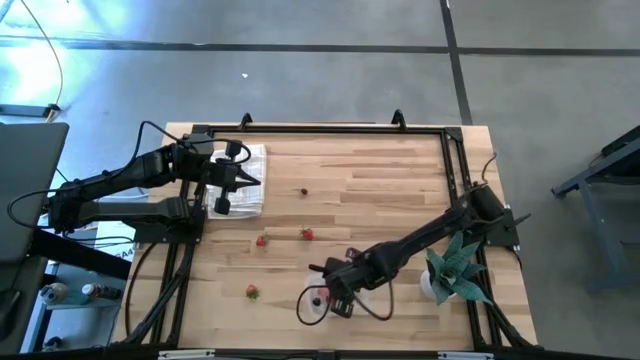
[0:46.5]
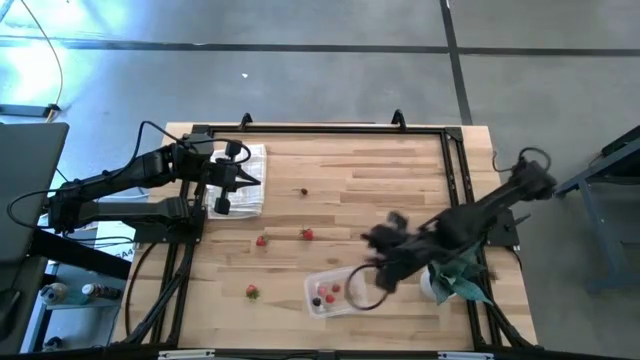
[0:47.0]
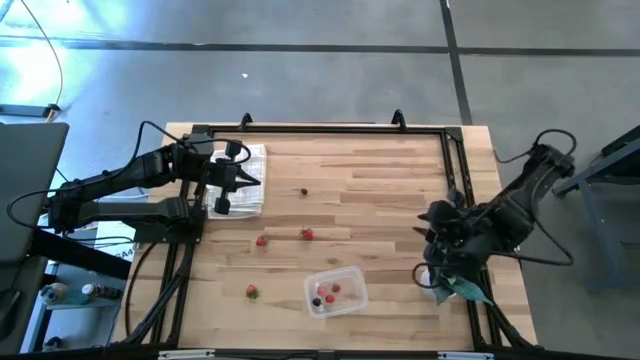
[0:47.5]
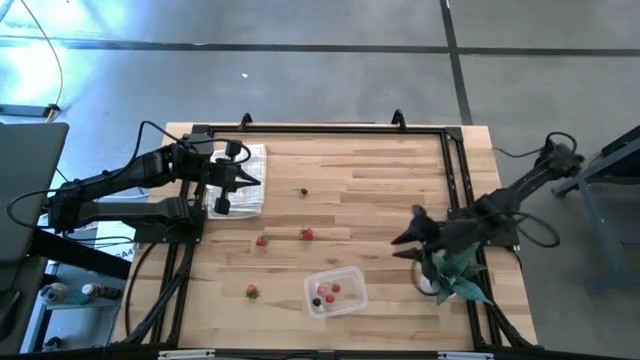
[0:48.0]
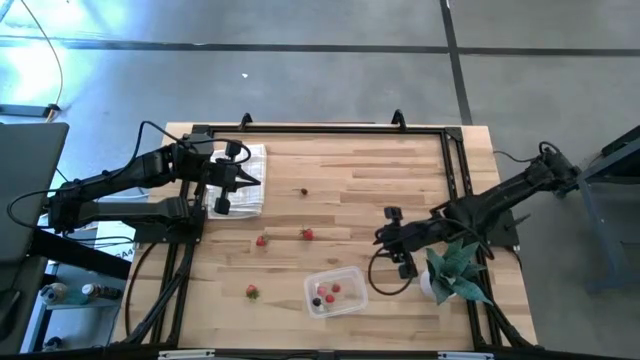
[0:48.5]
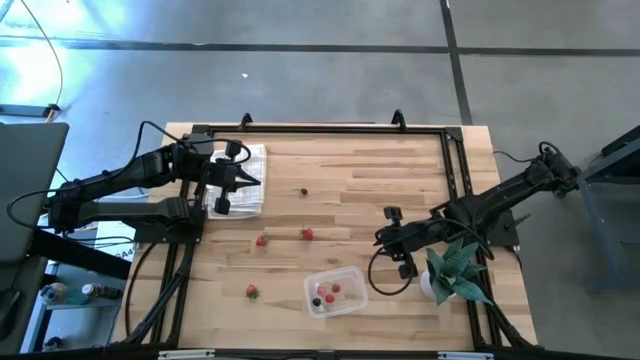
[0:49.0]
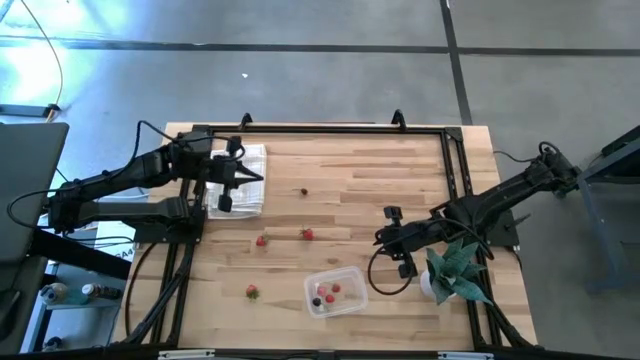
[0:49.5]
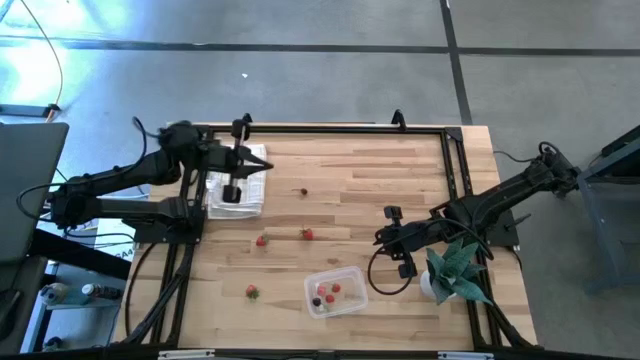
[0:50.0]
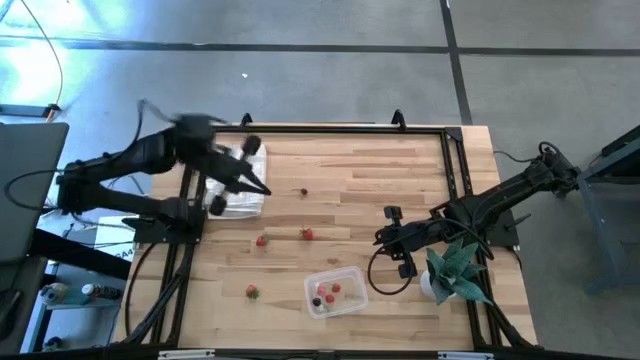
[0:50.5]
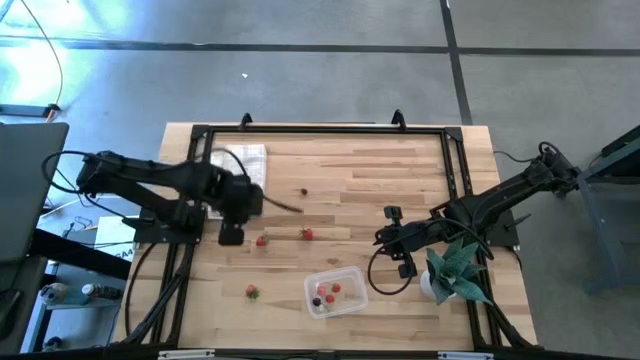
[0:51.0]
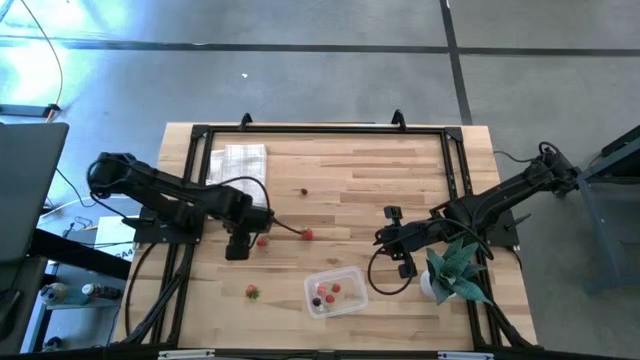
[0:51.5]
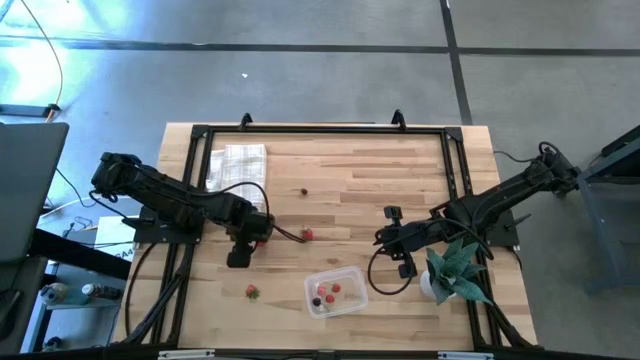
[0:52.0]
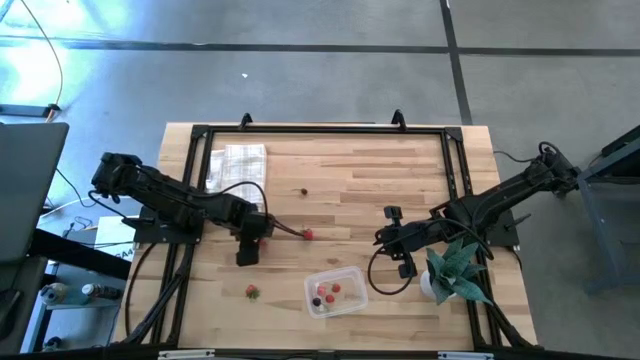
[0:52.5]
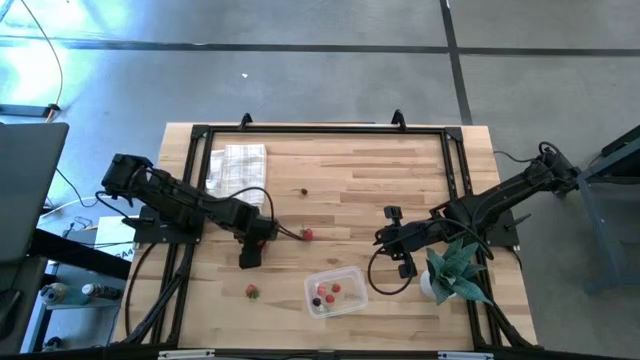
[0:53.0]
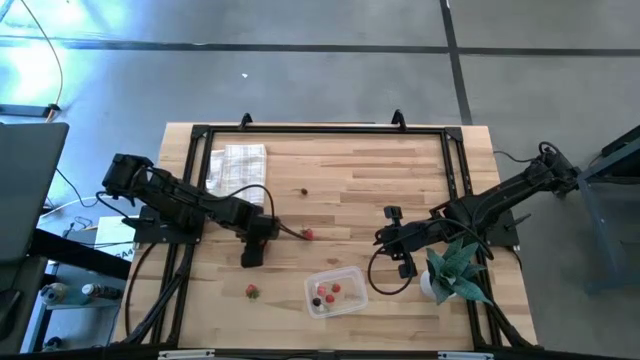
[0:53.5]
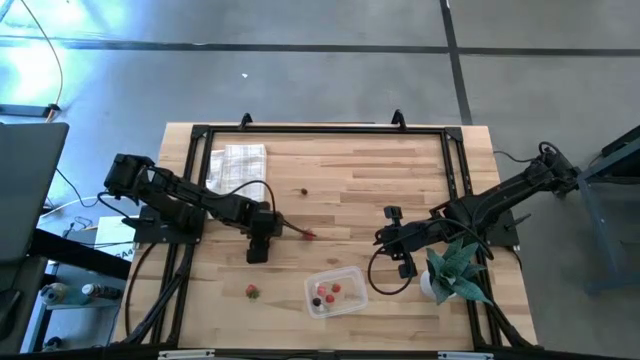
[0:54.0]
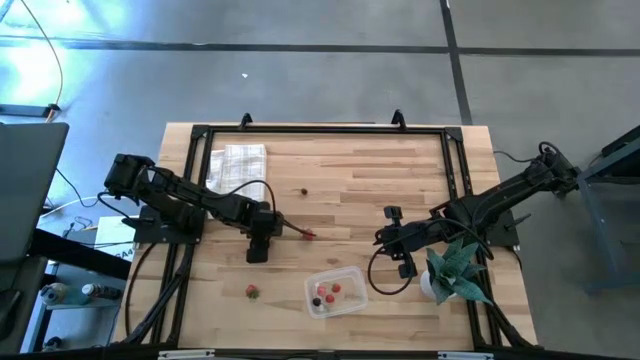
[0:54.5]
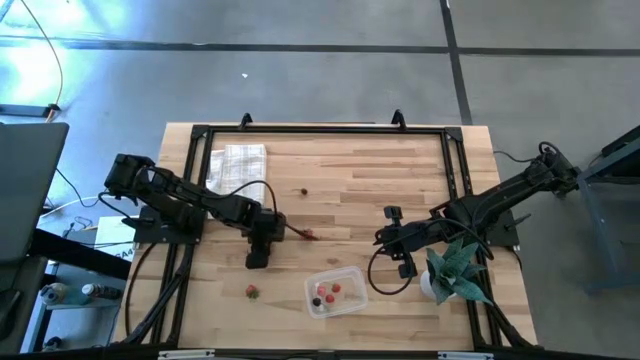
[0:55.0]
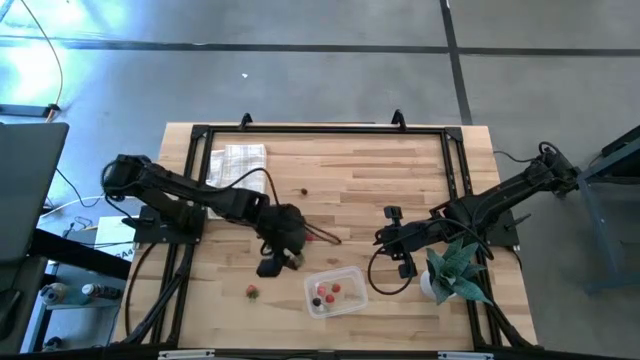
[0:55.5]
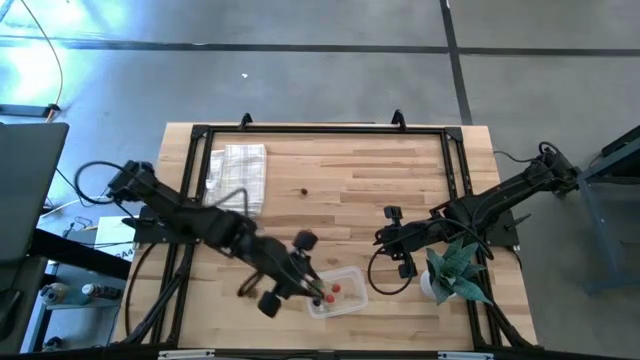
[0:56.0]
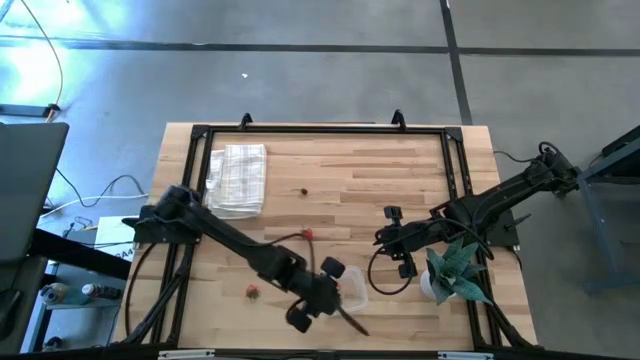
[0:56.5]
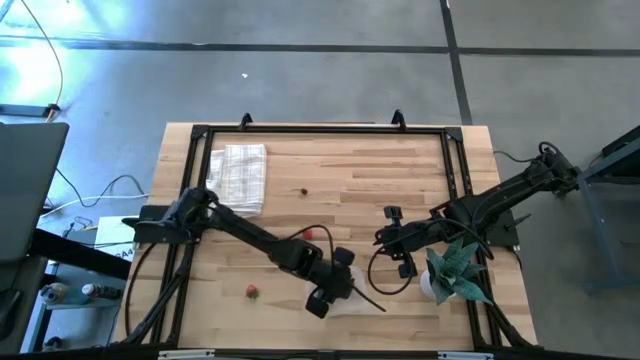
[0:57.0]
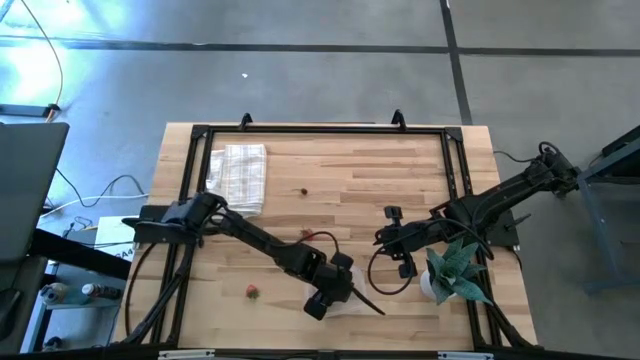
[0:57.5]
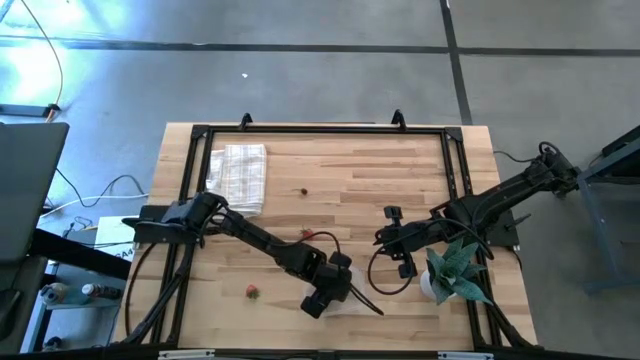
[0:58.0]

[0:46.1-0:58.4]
Task: Pick and placing Produce into tupperware
Put the red strawberry into the transparent bin

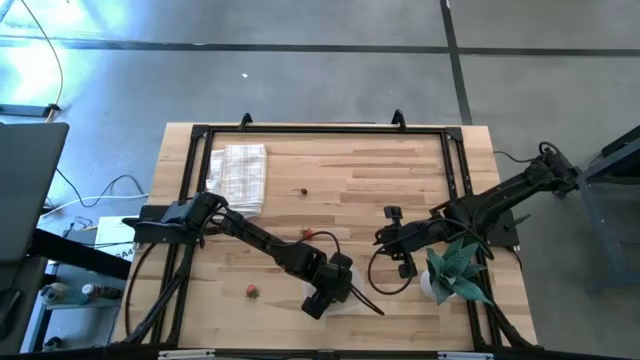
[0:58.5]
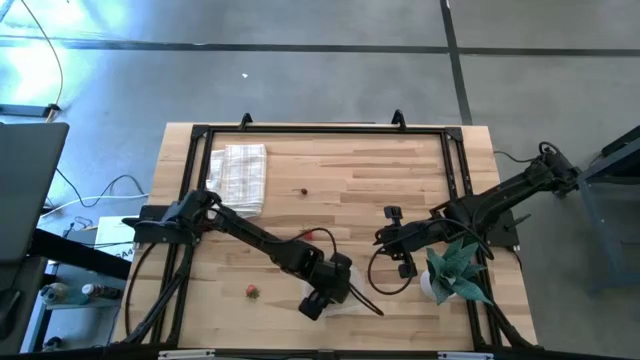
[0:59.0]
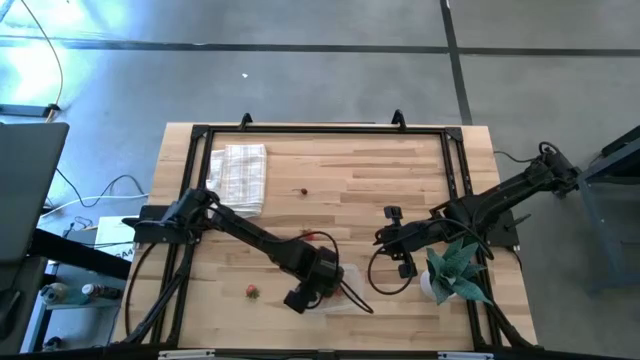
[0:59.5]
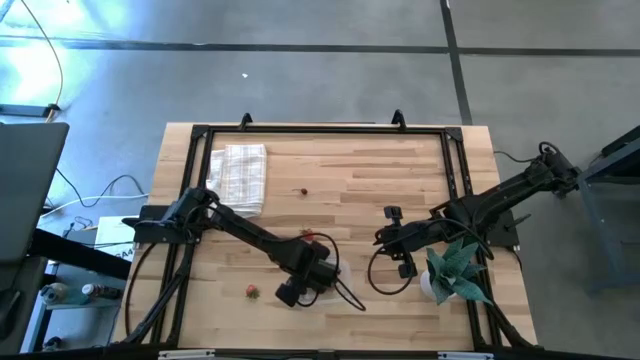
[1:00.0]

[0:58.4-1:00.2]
Adjust the transparent bin

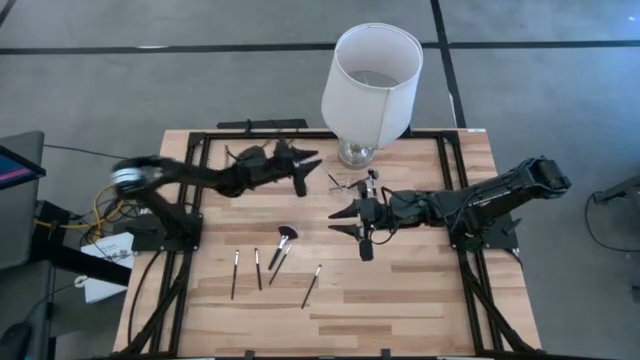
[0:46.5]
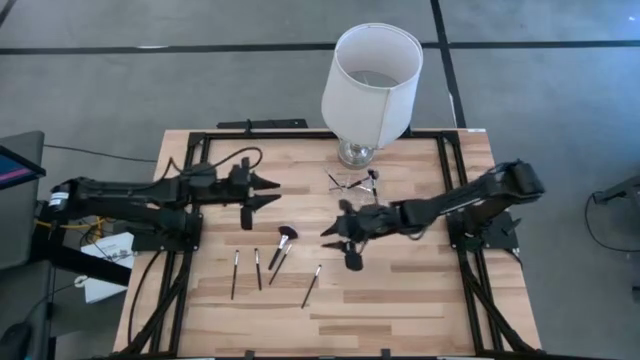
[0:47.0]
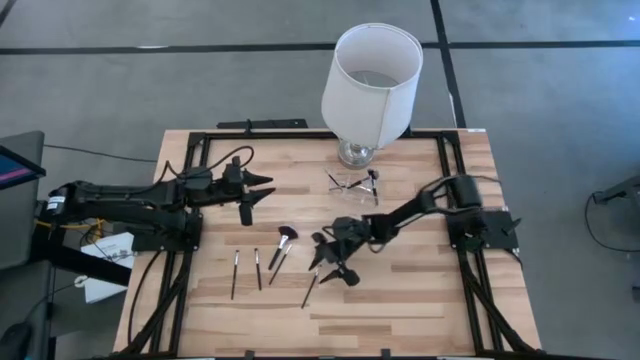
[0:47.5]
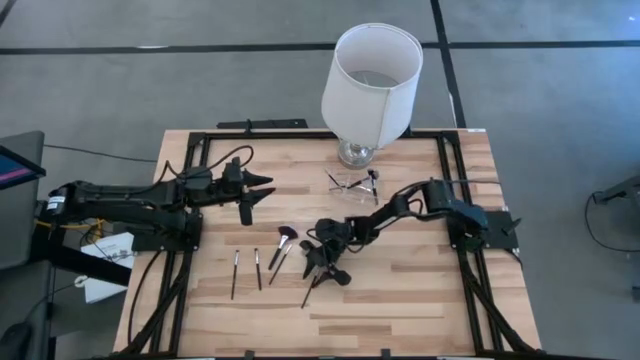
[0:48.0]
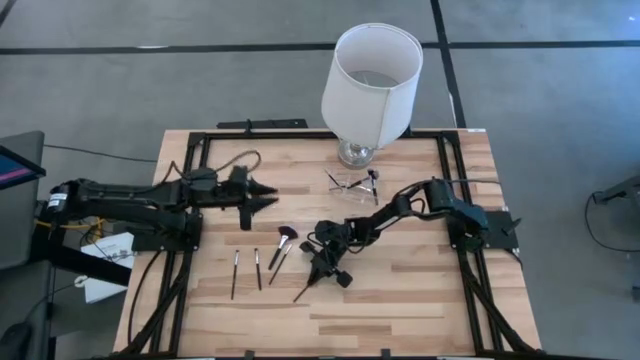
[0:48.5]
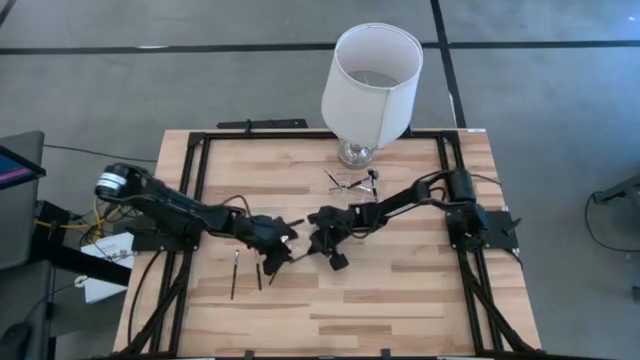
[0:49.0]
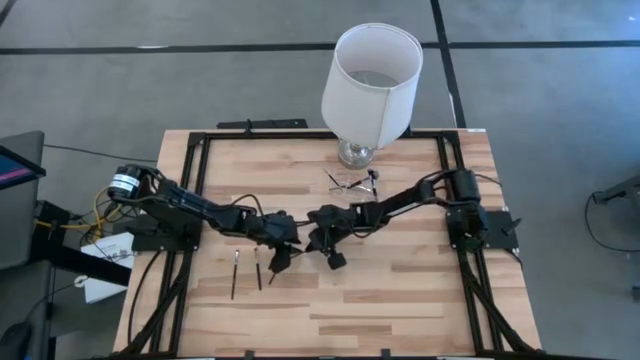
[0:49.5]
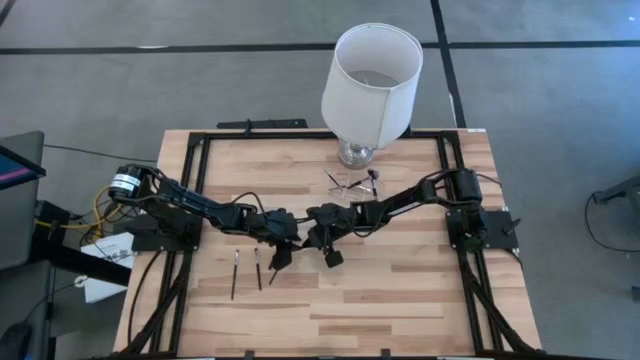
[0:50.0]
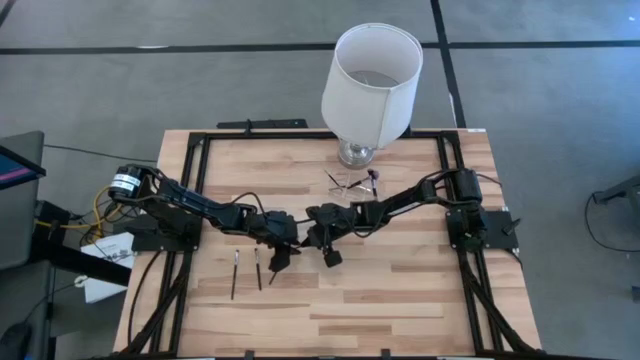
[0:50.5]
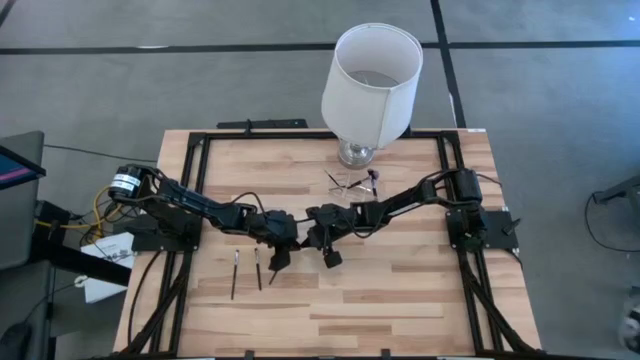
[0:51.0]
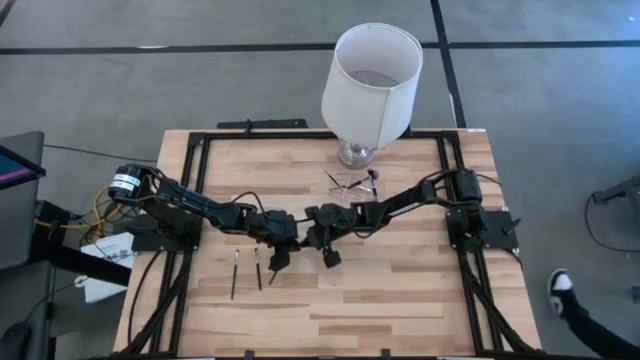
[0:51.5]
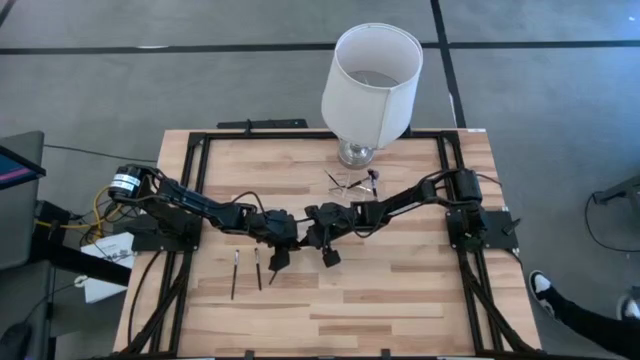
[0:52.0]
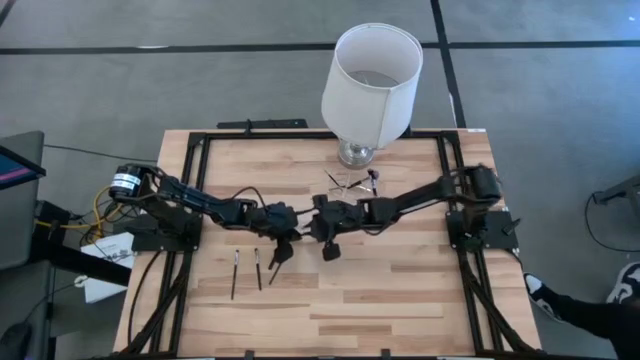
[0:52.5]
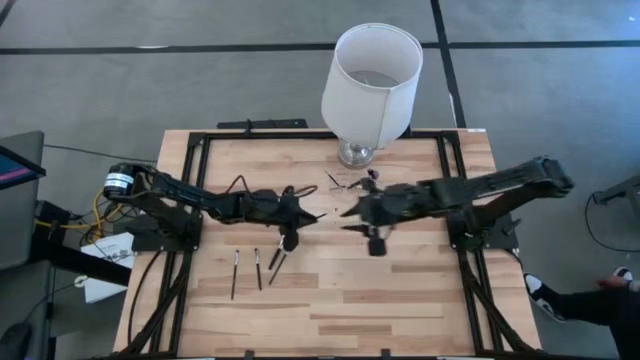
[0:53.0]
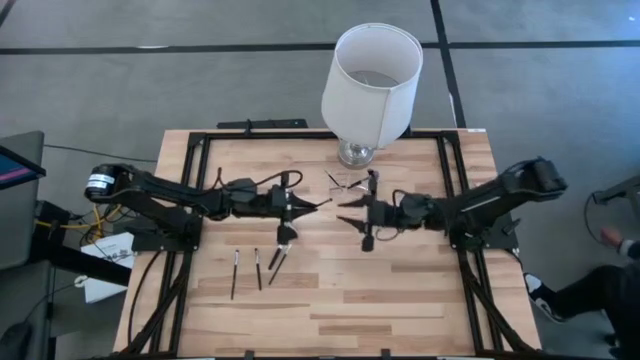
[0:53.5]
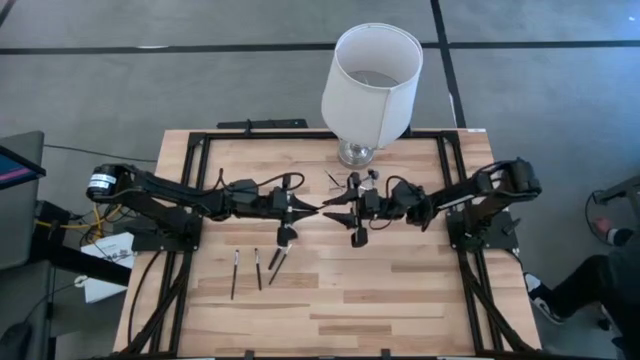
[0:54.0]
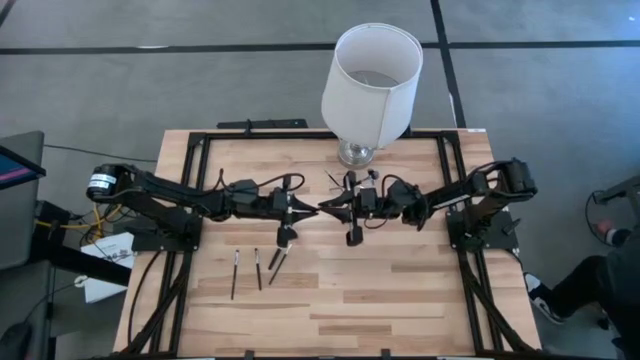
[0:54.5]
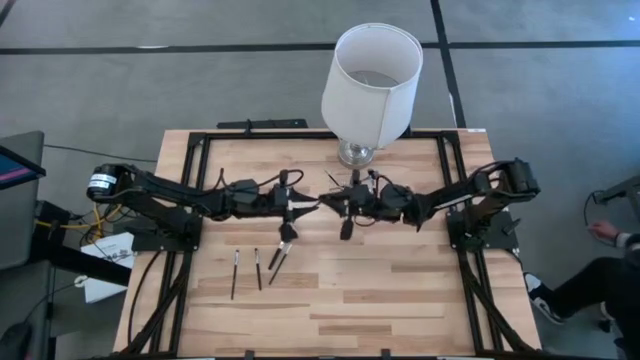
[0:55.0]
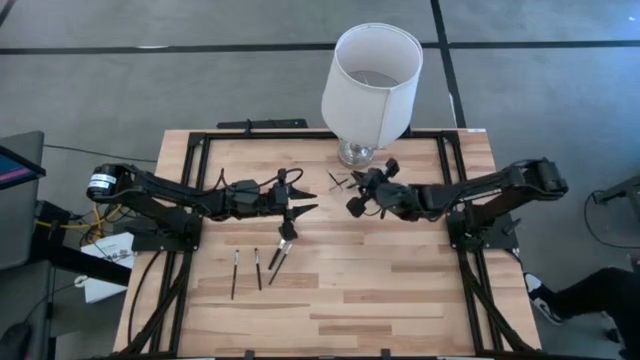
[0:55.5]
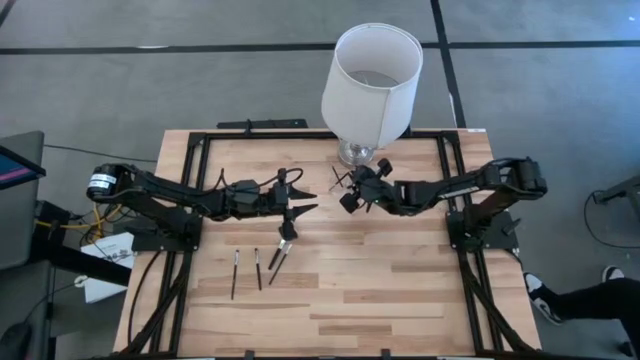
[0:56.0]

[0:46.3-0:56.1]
Task: Put items in baskets/containers
Put the black eyeshadow brush into the transparent organizer
